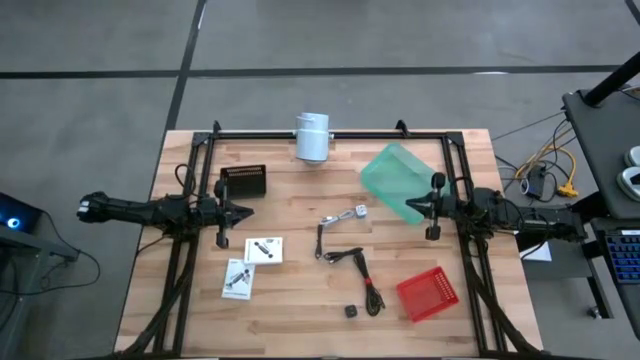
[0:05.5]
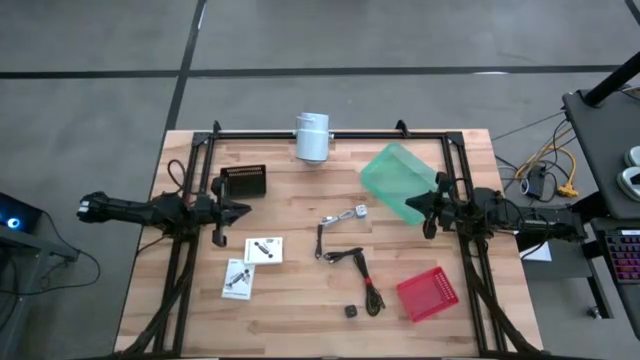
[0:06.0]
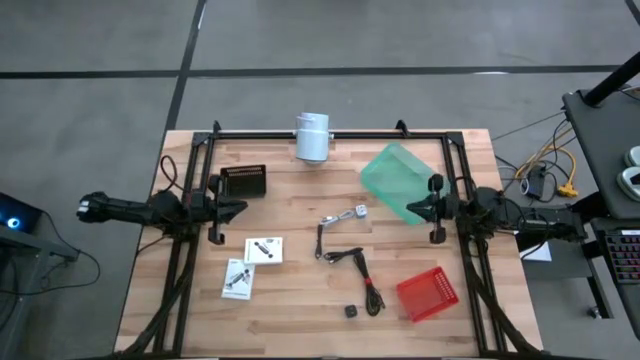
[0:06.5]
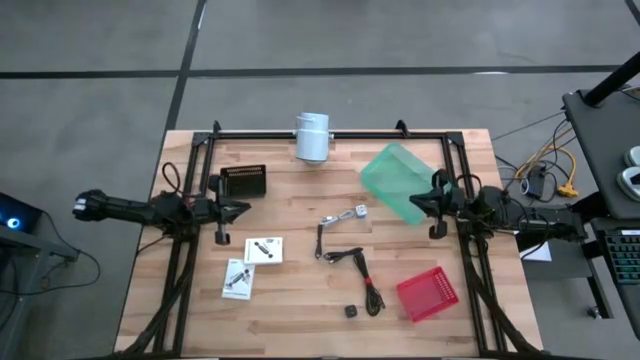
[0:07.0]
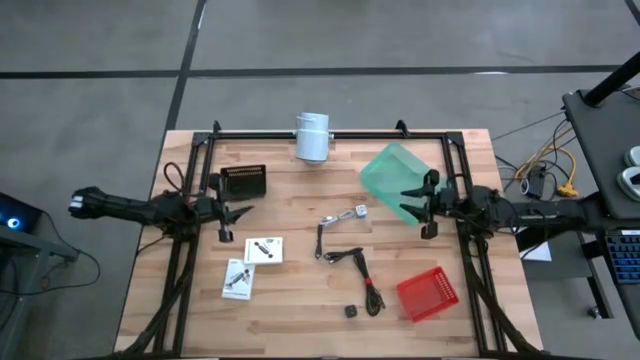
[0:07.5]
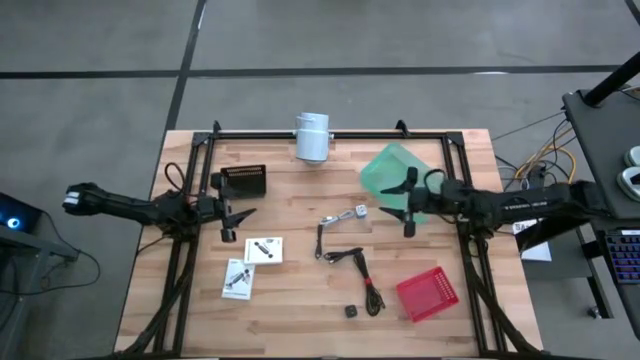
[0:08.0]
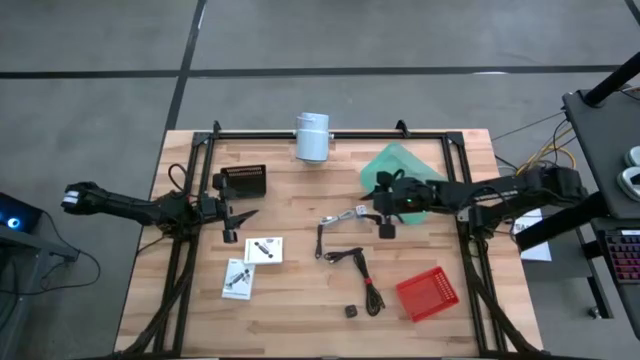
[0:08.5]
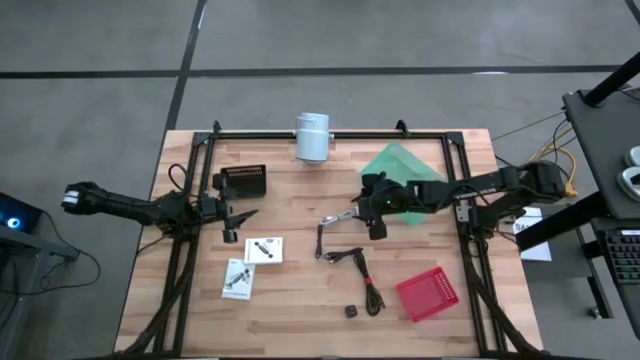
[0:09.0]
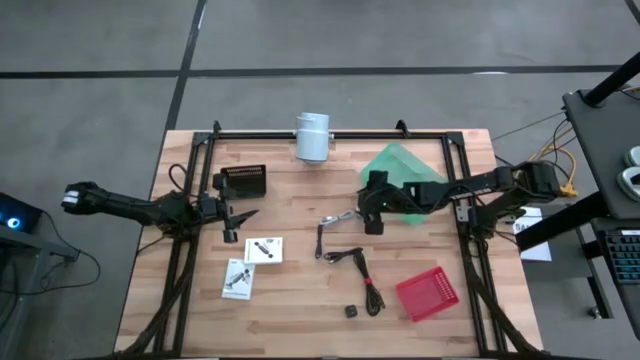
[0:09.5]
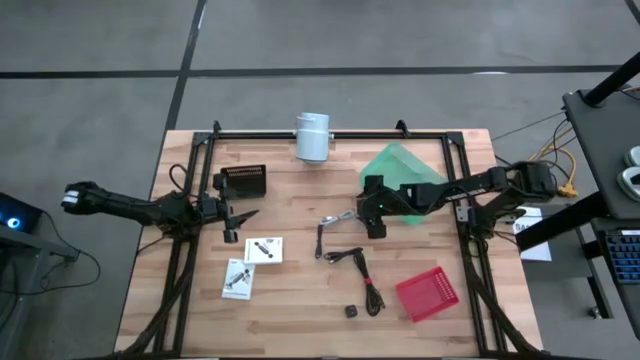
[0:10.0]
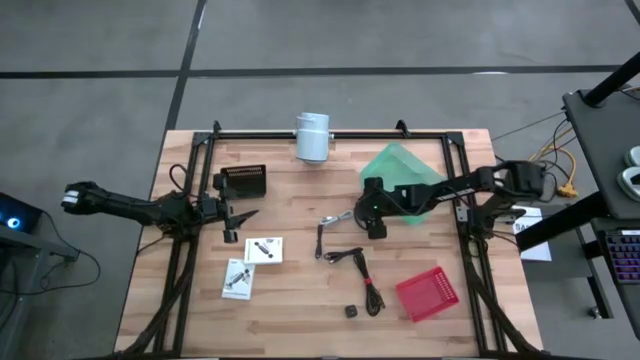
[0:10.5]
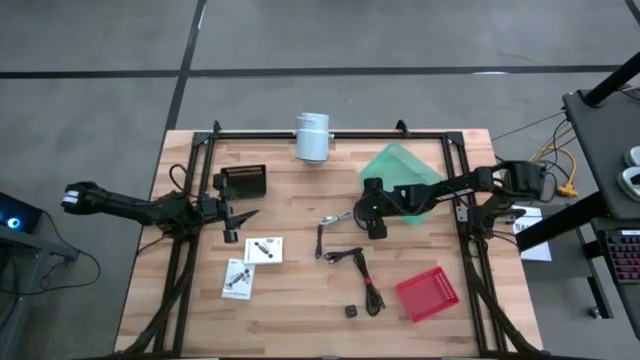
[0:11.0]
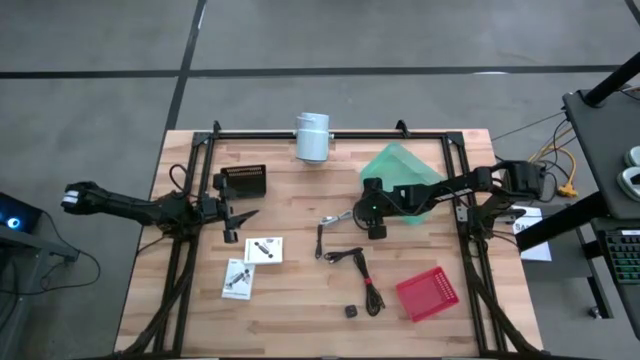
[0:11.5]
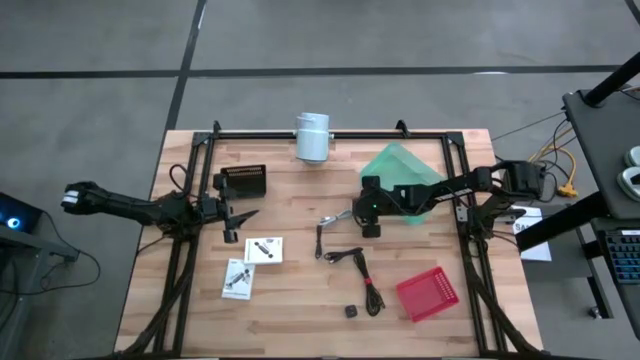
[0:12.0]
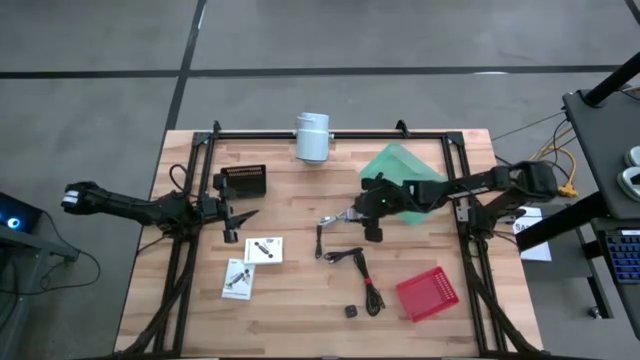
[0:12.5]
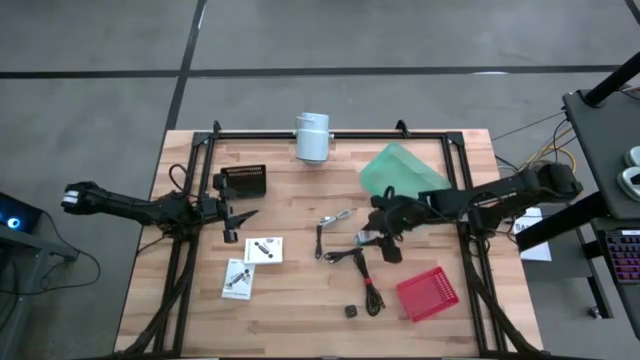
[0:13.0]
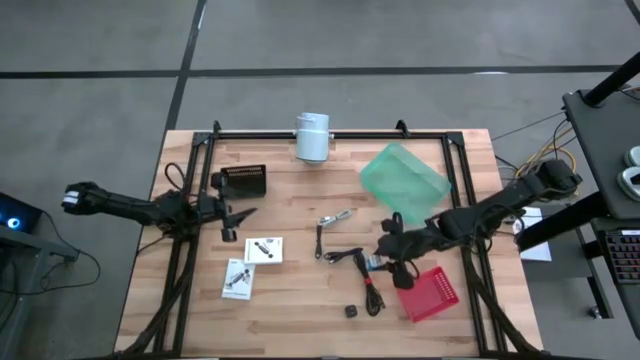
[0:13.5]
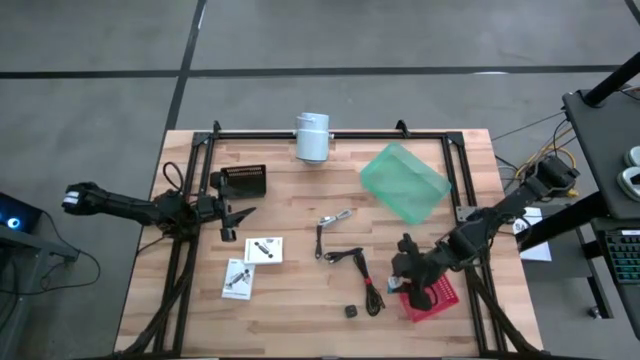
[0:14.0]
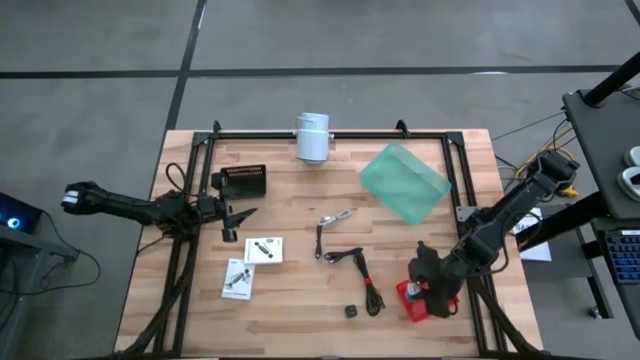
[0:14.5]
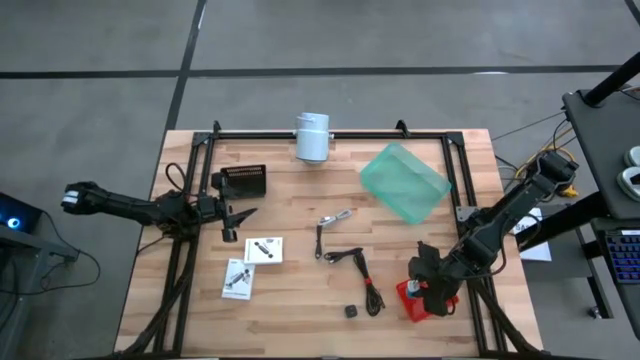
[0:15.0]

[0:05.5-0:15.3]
Task: Pick and place items into bin
Put the white charger adapter into the red bin

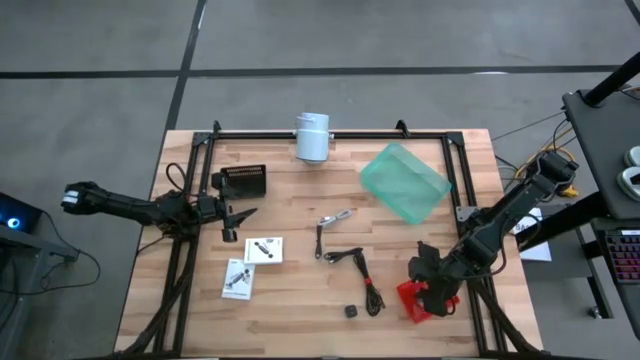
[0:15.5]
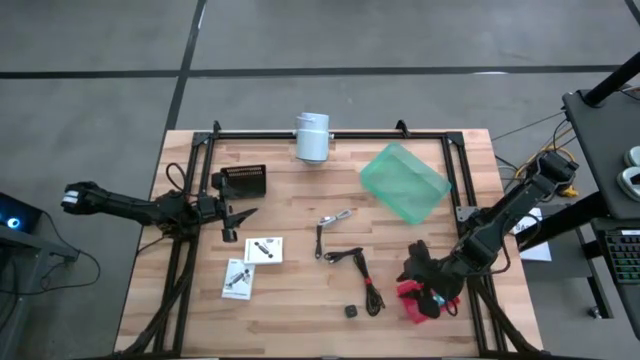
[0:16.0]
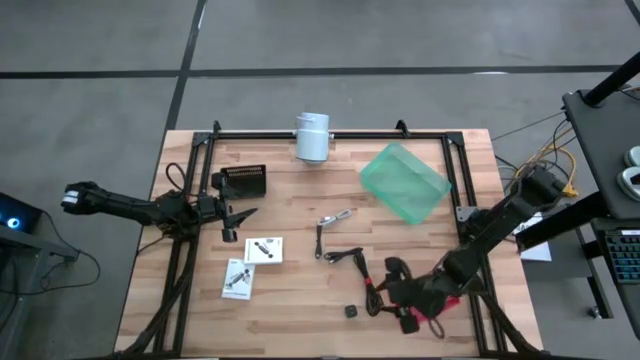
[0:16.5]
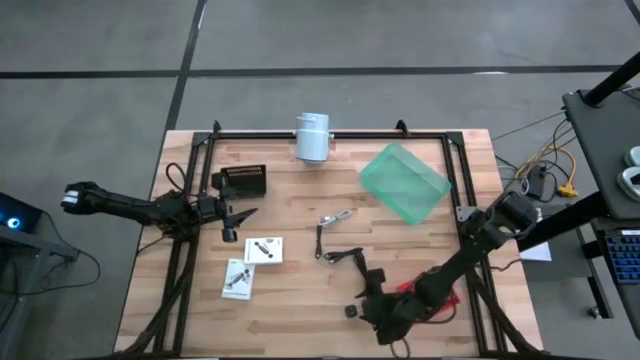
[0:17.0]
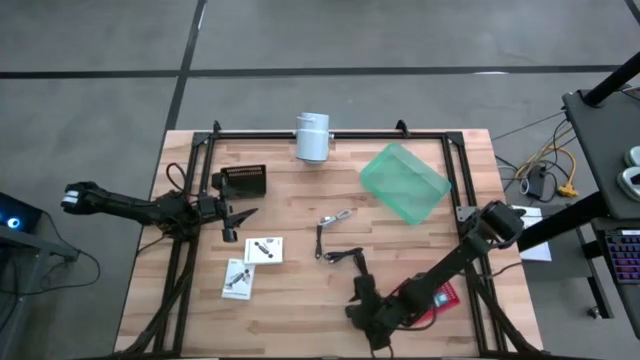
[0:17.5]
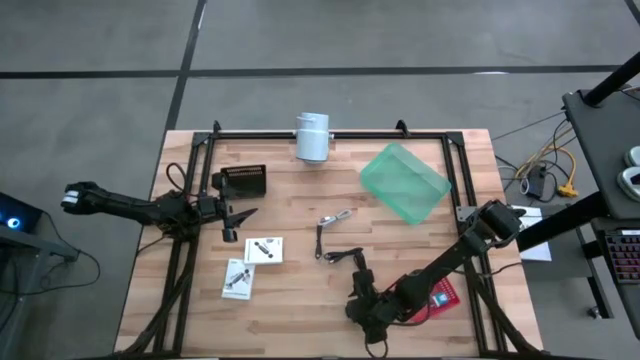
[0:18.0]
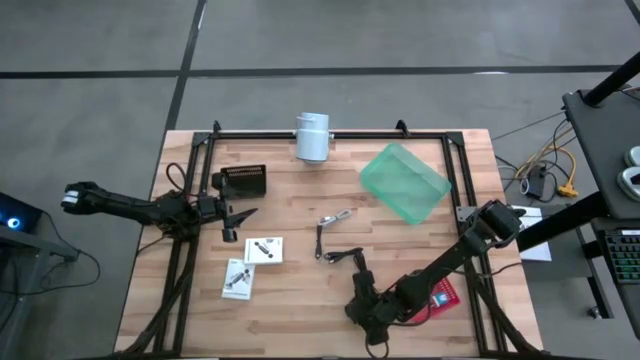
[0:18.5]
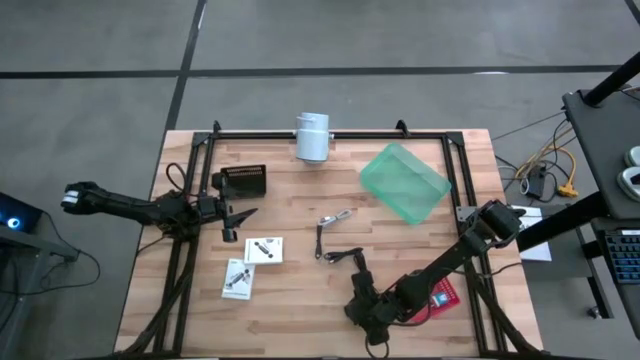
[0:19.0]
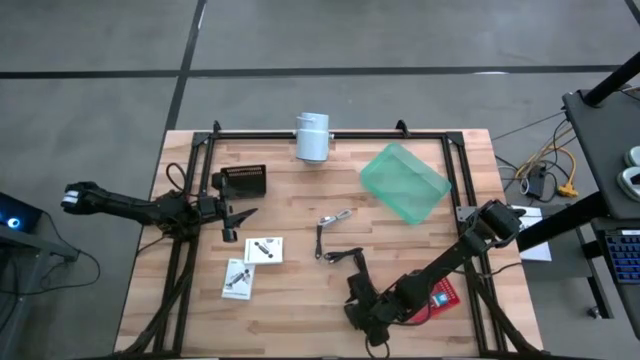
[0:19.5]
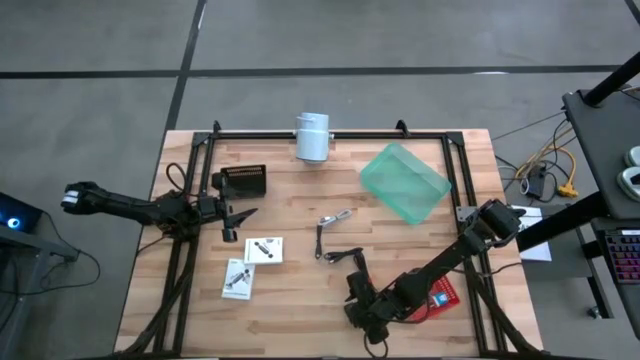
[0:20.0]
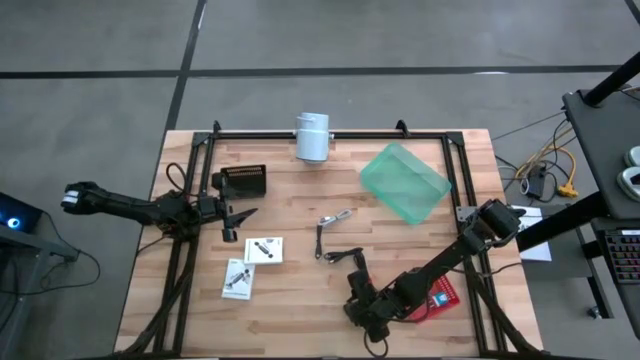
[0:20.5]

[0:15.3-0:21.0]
Put the black charger adapter into the red bin

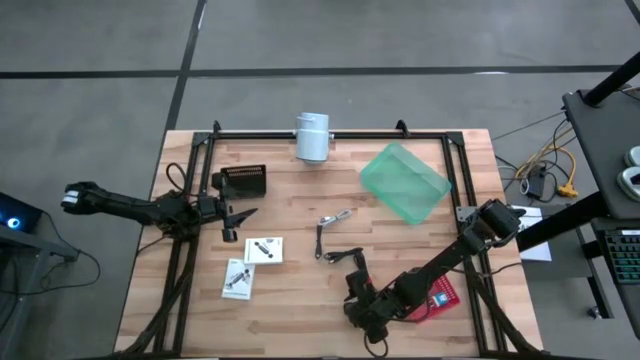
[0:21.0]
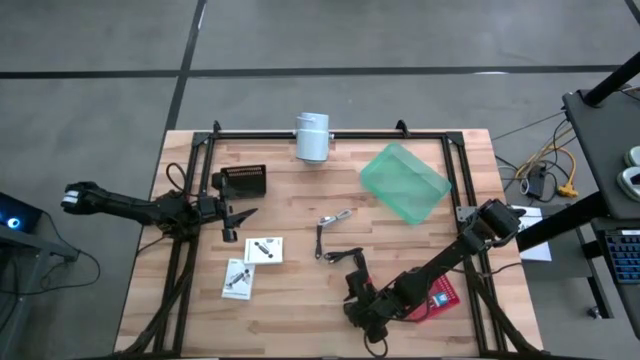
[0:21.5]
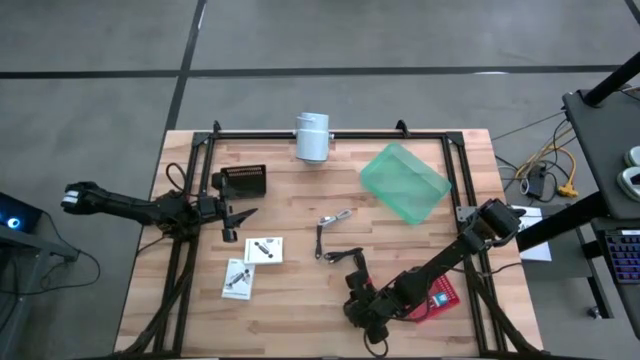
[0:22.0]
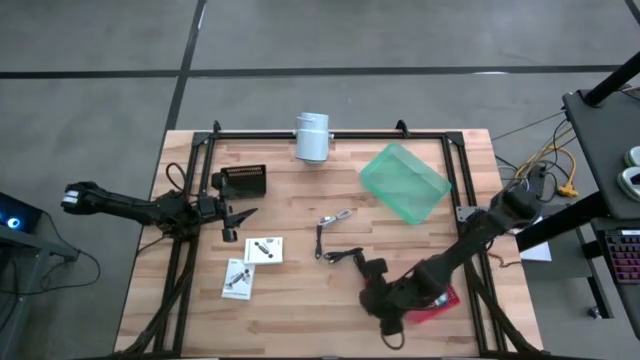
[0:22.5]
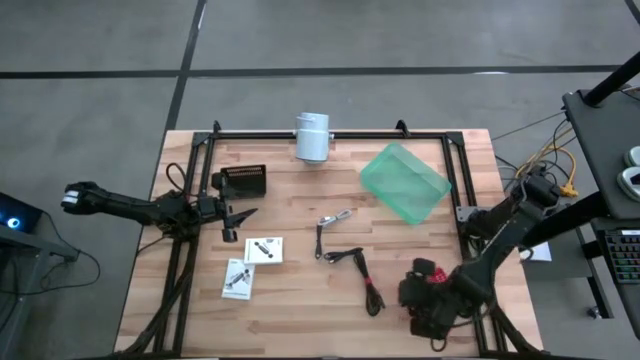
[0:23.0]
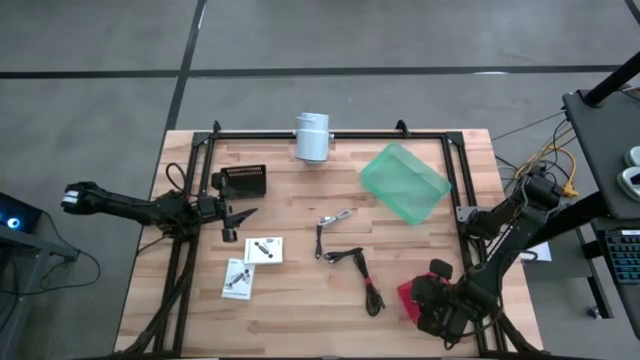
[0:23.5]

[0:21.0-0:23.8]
Put the black charger adapter into the red bin

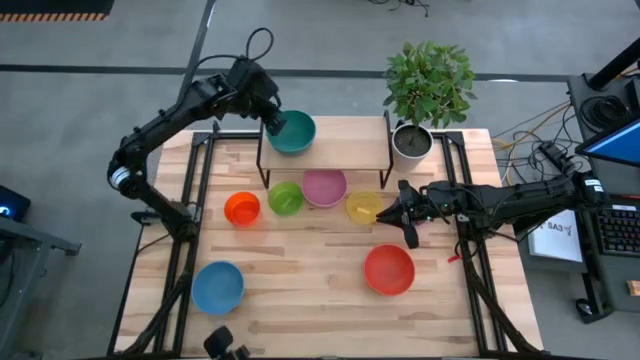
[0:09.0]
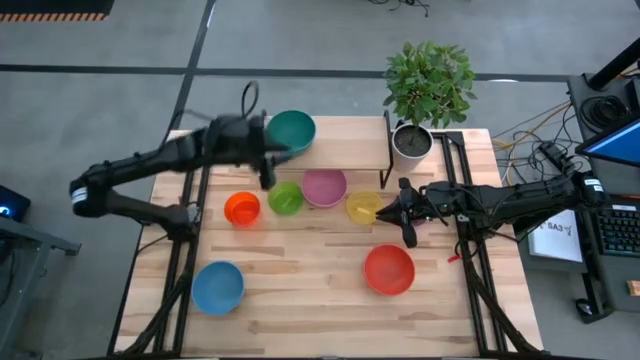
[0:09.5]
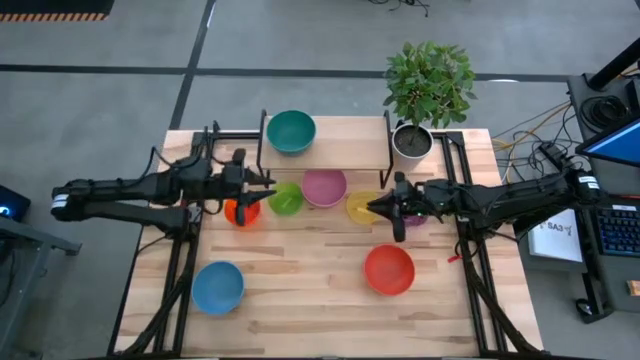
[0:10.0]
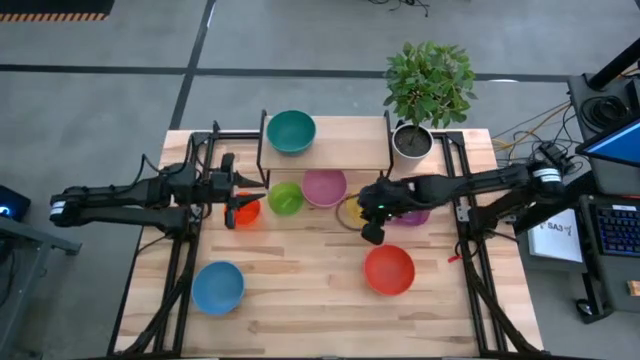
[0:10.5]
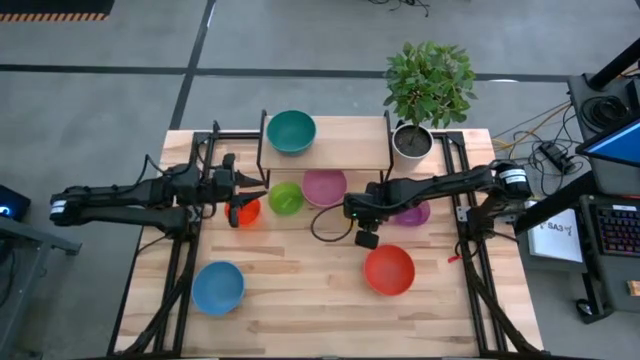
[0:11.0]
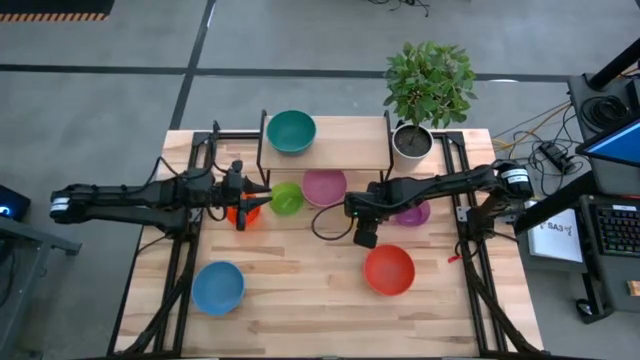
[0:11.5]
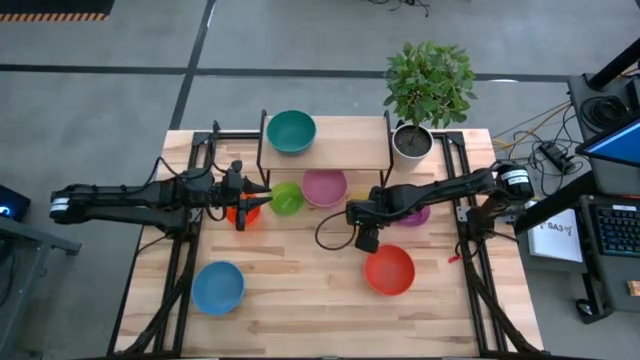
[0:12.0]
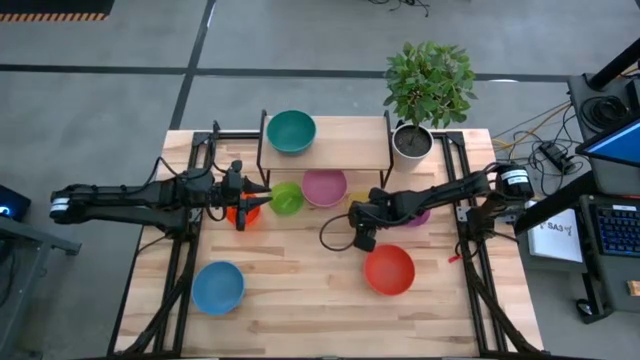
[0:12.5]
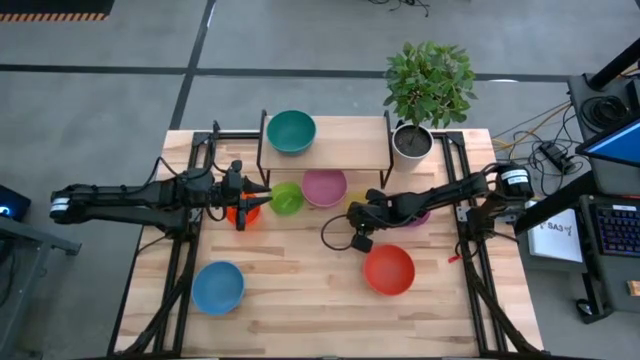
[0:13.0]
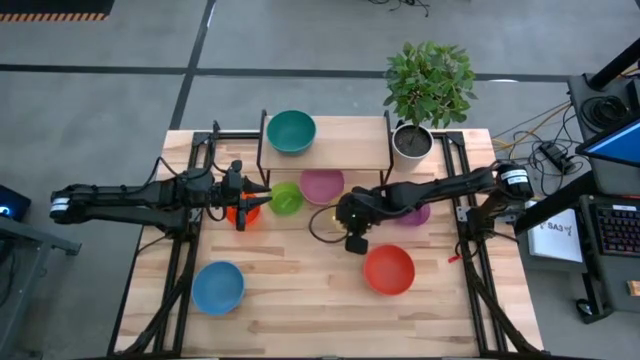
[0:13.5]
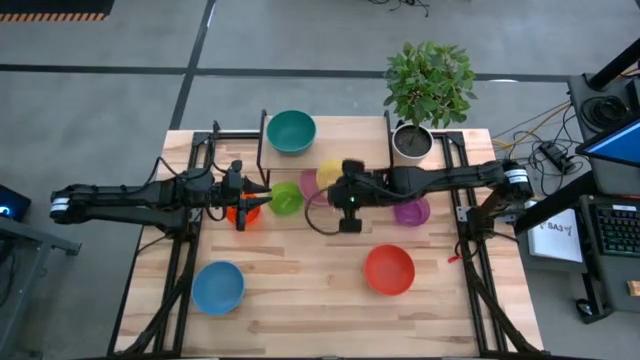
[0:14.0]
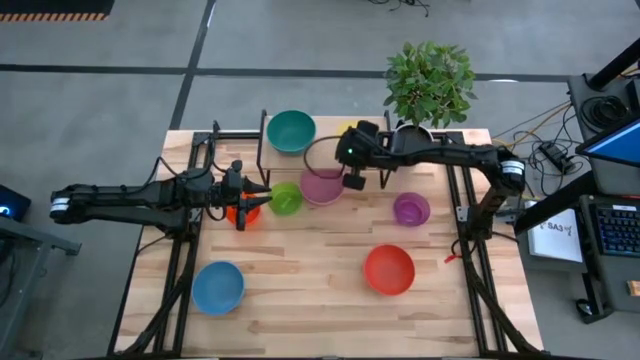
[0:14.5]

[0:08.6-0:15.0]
Task: Place and stack bowls onto a shelf
Put the yellow bowl on the shelf
